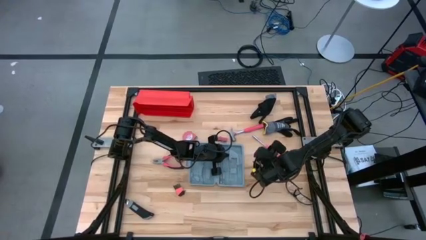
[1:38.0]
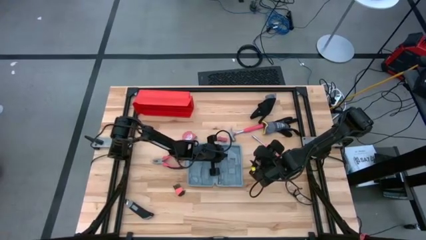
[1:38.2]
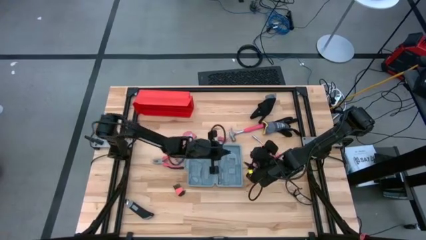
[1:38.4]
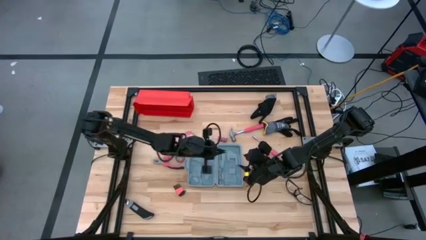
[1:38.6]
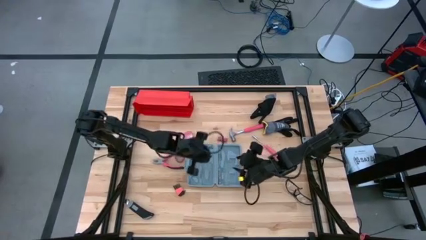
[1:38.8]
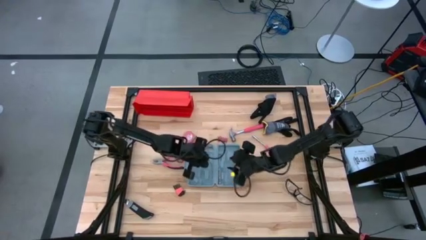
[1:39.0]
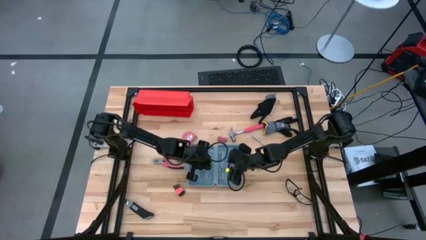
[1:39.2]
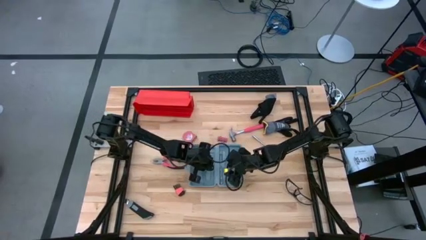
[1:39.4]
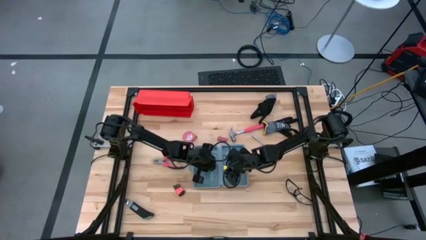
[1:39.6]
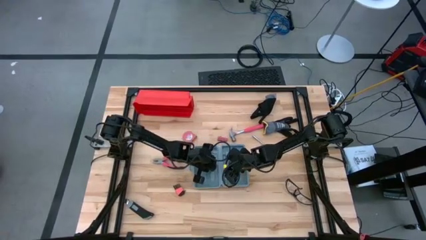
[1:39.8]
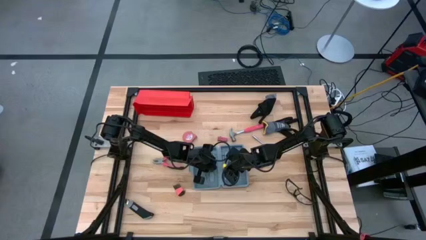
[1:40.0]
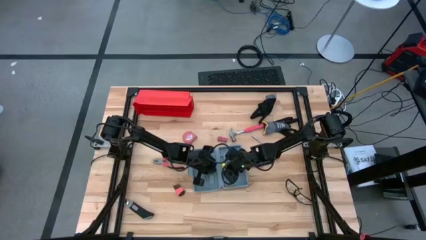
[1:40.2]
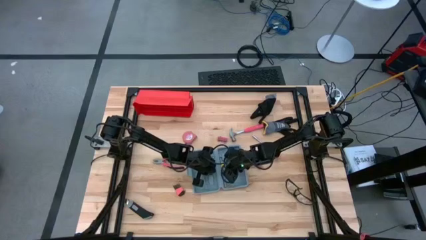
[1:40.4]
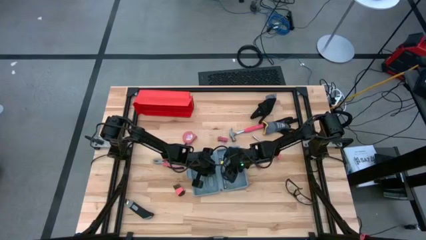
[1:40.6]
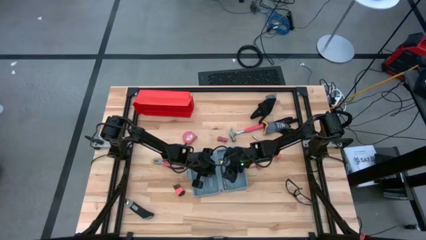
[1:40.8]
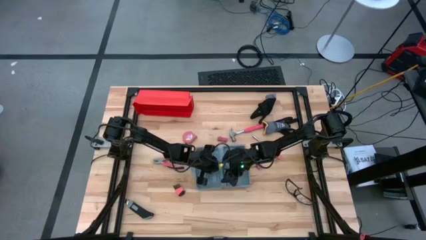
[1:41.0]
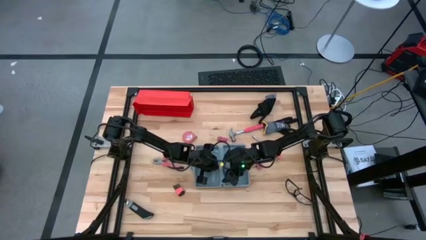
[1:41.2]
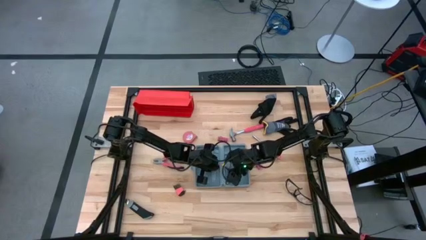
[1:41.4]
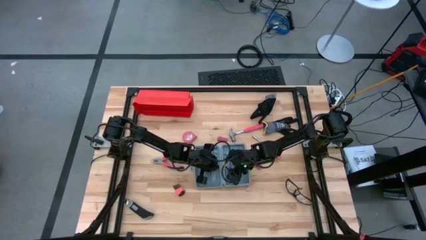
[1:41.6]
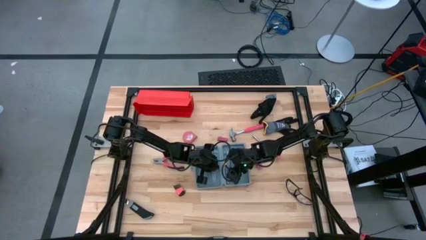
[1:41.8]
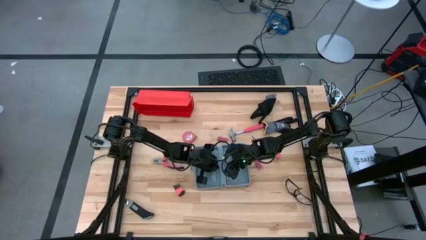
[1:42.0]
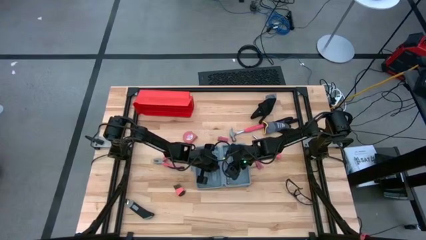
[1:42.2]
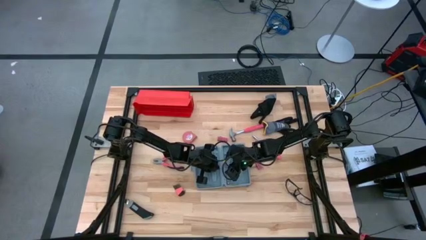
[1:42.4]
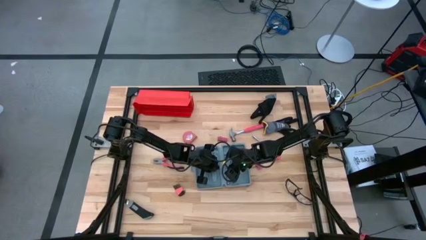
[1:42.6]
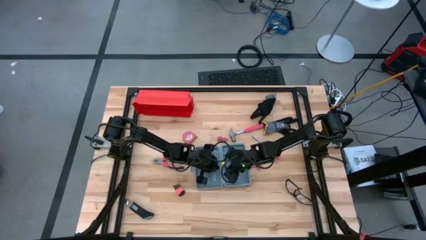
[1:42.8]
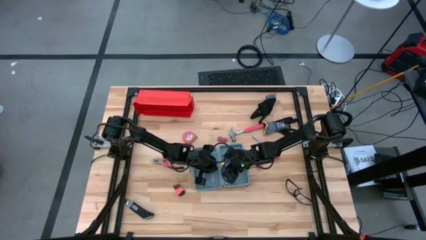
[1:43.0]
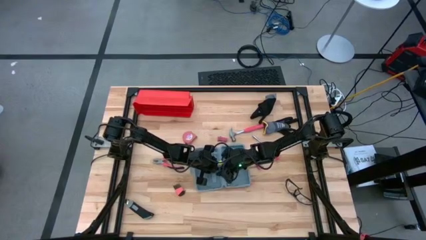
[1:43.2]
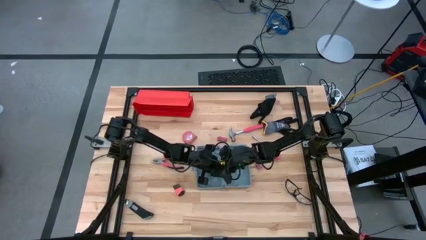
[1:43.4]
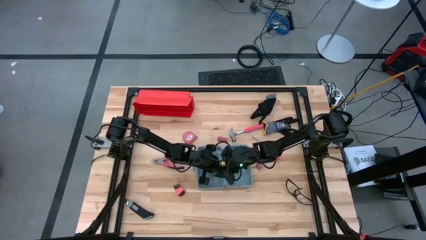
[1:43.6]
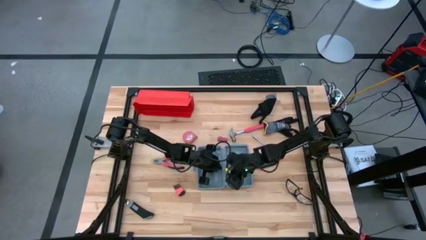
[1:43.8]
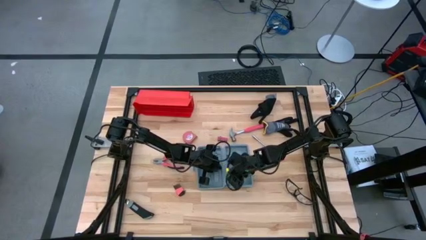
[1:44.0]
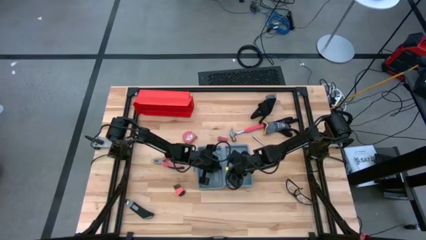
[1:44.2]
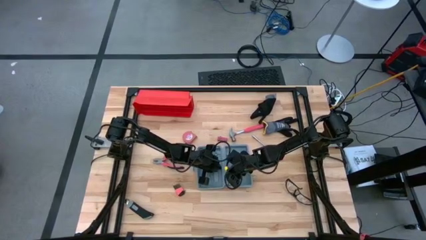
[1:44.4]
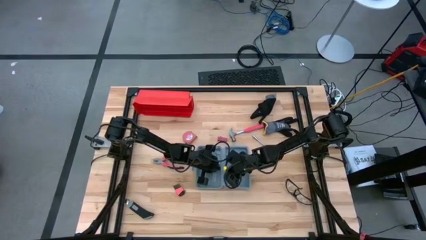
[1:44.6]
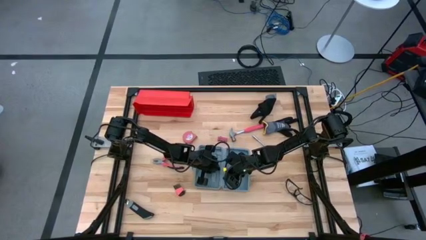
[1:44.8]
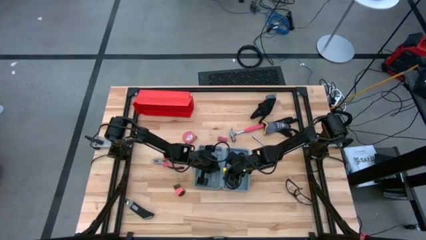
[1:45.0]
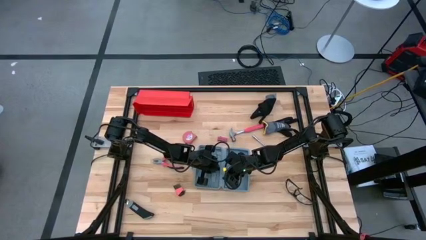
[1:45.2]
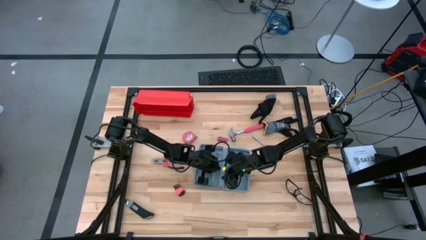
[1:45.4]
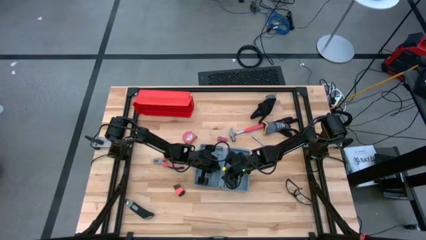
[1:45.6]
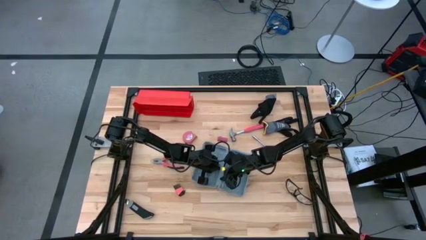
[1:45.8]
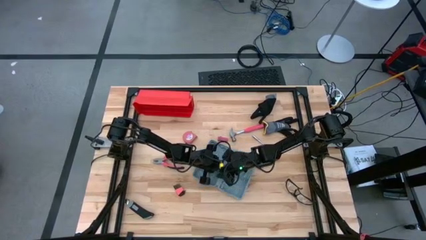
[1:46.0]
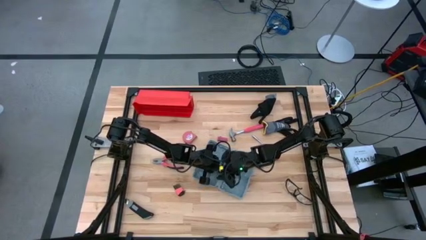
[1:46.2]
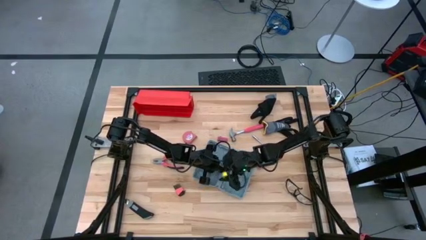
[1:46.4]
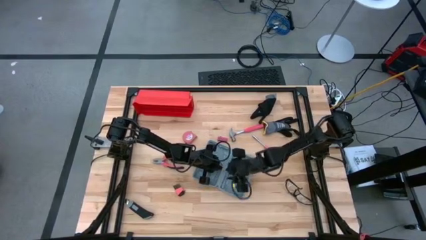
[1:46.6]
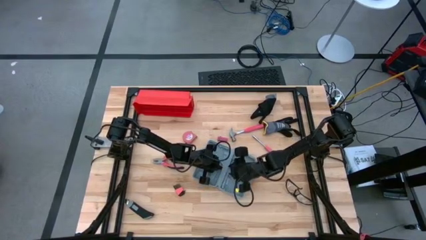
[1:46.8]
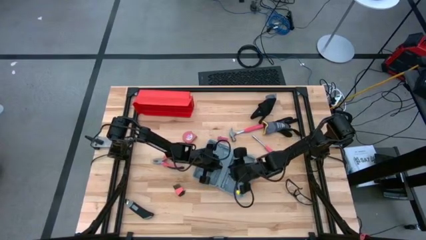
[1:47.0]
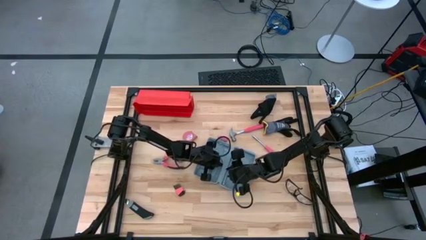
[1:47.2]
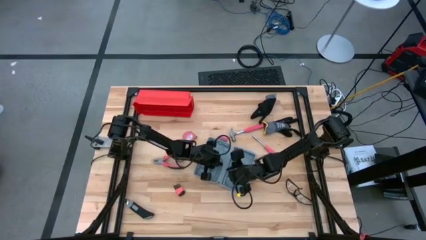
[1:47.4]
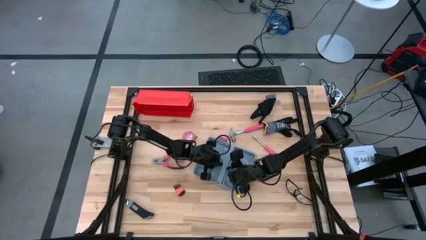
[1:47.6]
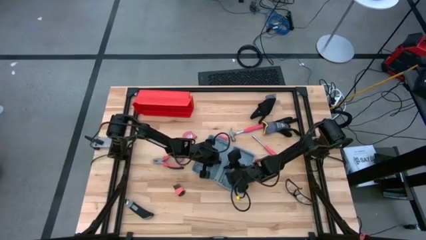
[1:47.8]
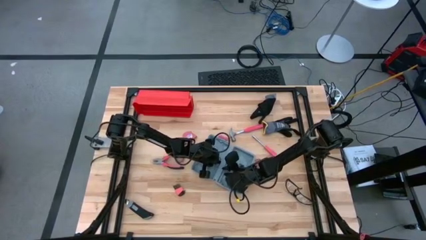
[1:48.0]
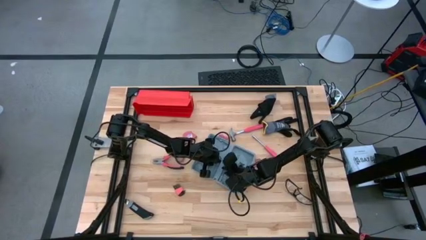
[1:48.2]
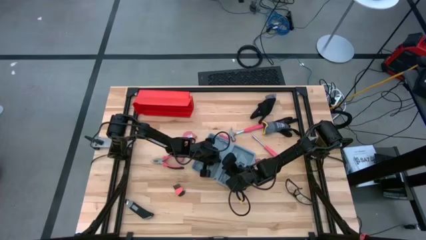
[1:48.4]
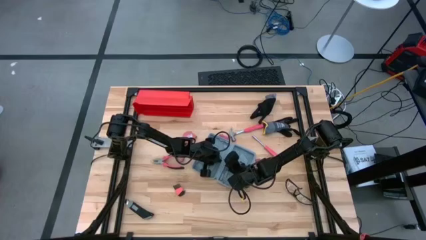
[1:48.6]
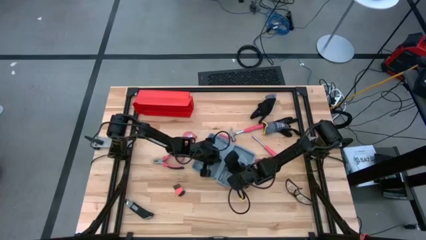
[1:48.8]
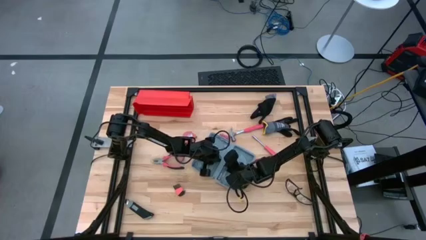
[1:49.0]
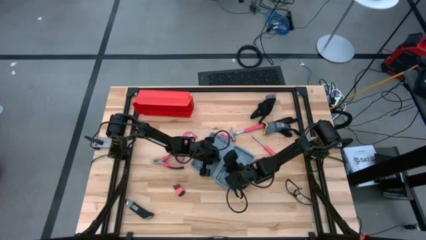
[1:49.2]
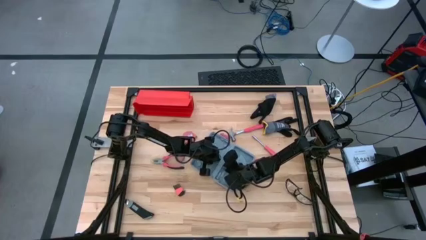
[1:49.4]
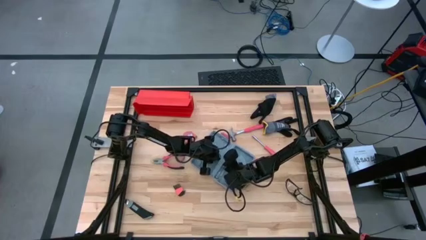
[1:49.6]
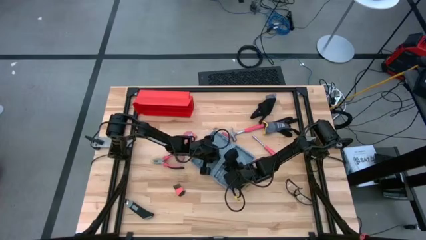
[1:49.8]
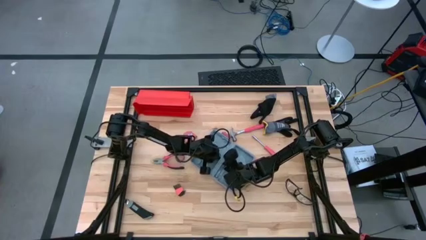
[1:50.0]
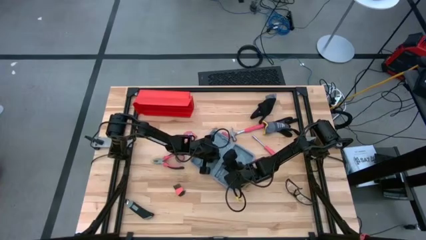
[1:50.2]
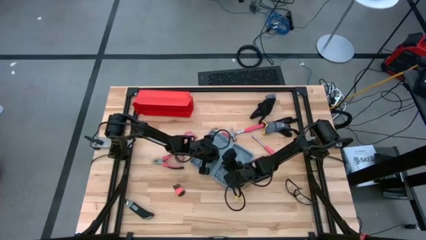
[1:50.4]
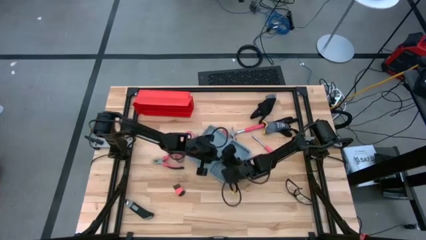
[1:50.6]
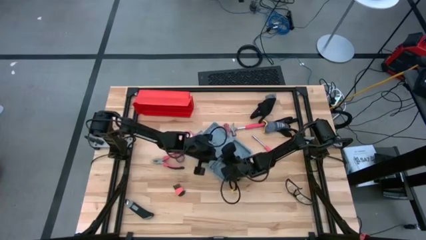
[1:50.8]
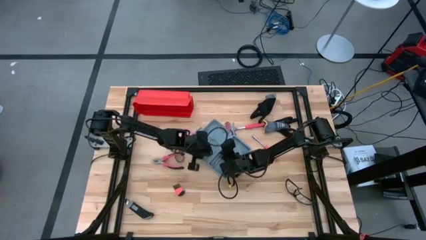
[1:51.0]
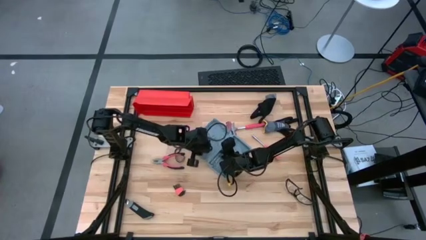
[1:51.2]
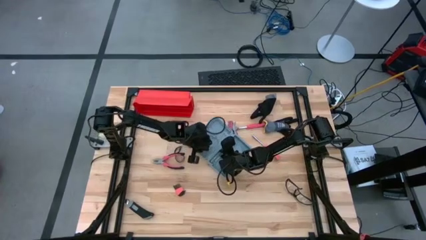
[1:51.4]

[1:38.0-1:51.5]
Task: prefit tool cases
Remove the transparent flat screwdriver from the gray pre-fit tool case

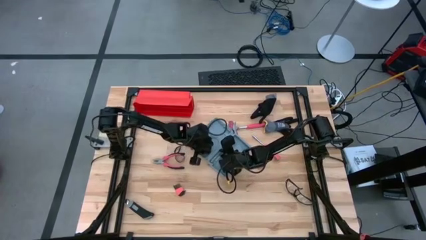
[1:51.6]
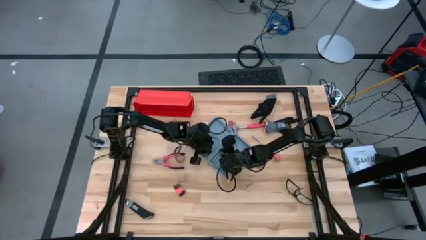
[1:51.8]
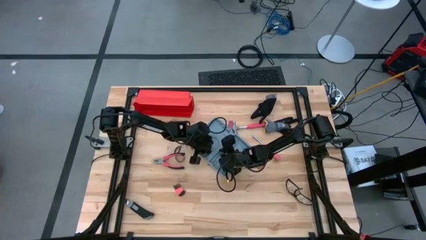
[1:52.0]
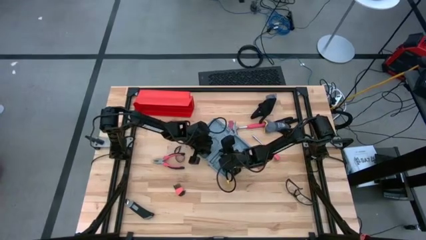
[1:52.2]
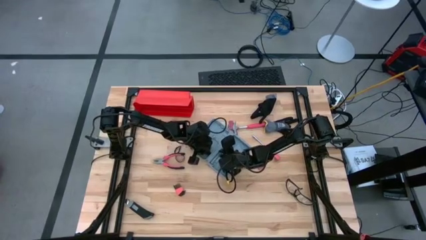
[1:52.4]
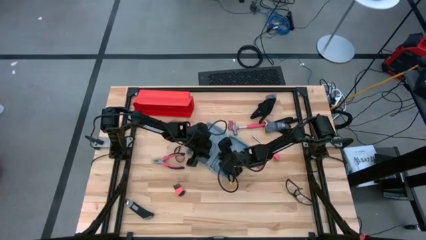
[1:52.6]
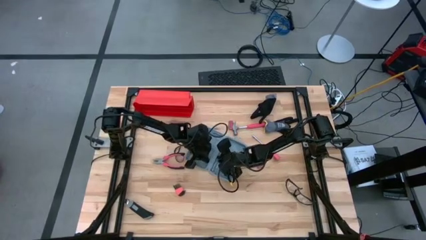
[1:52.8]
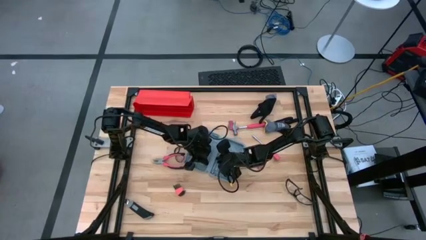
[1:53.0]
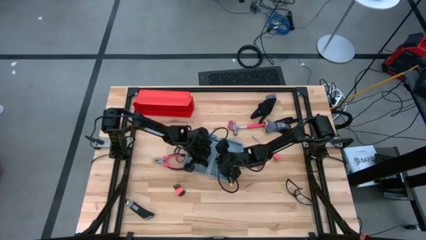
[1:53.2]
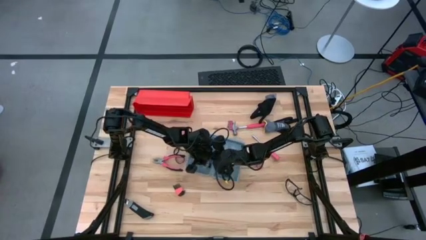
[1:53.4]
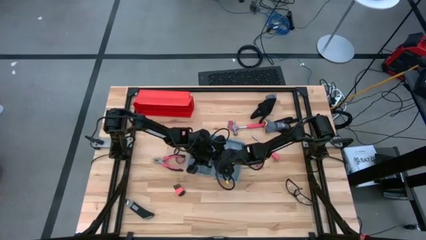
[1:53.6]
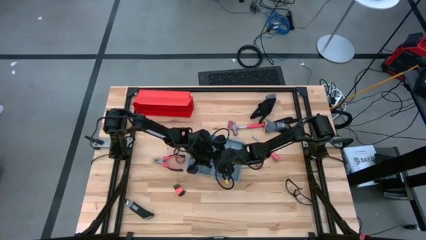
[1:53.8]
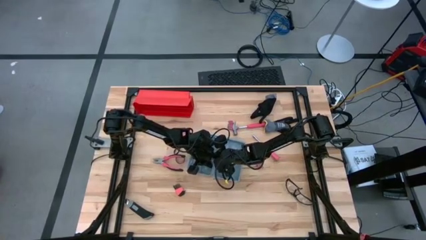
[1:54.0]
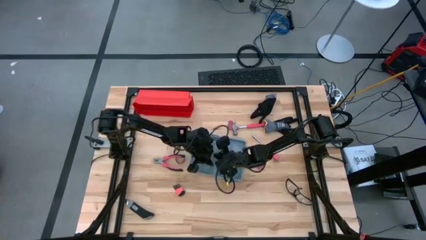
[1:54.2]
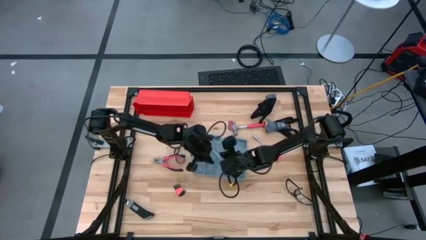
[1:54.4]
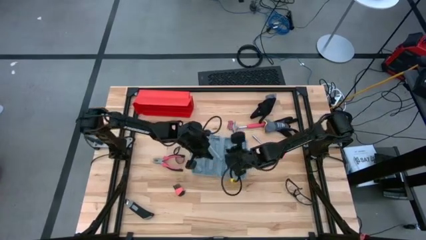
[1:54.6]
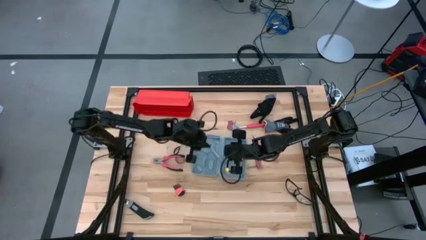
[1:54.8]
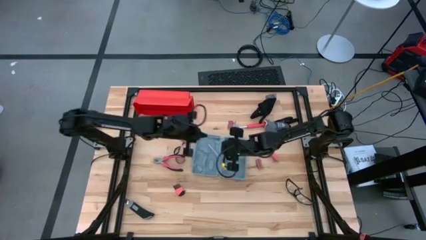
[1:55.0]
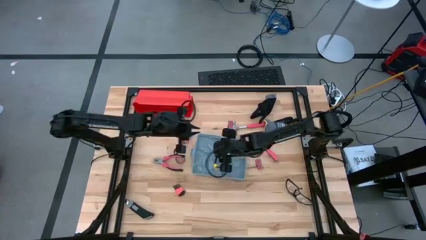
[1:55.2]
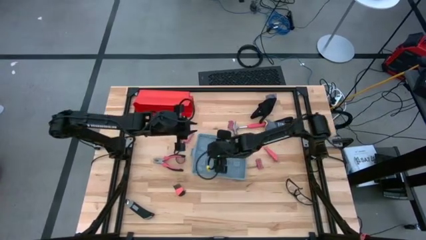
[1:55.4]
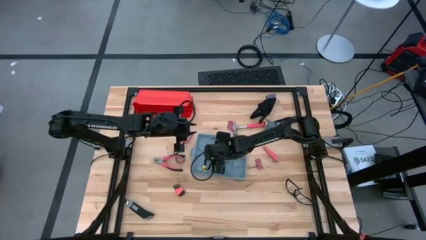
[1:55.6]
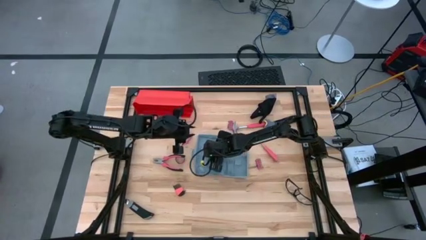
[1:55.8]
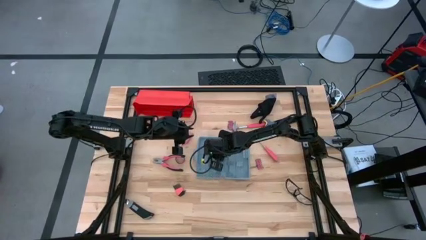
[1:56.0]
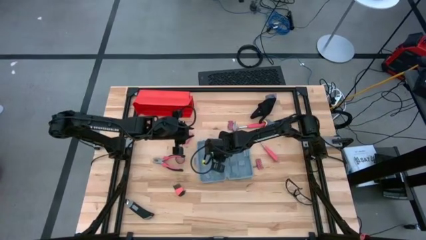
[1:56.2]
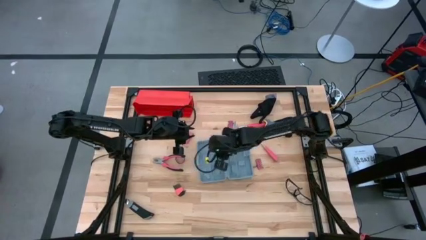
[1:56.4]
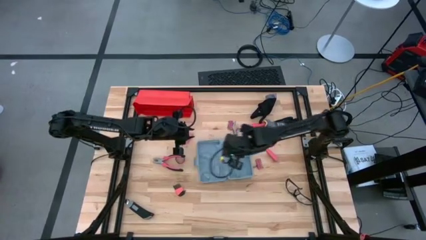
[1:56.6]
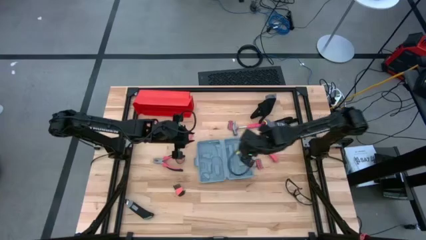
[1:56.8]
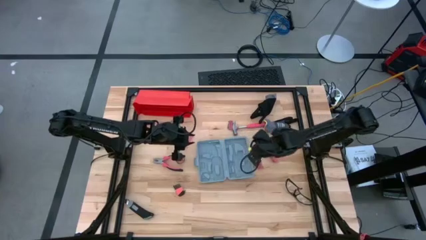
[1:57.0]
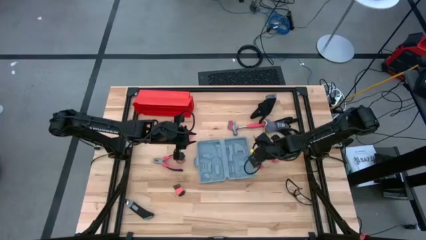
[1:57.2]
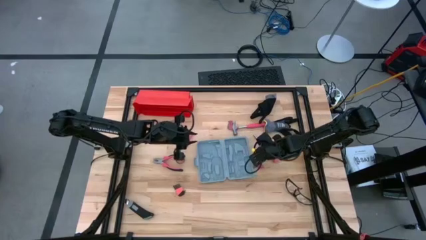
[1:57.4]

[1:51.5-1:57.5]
Remove the transparent flat screwdriver from the gray pre-fit tool case
